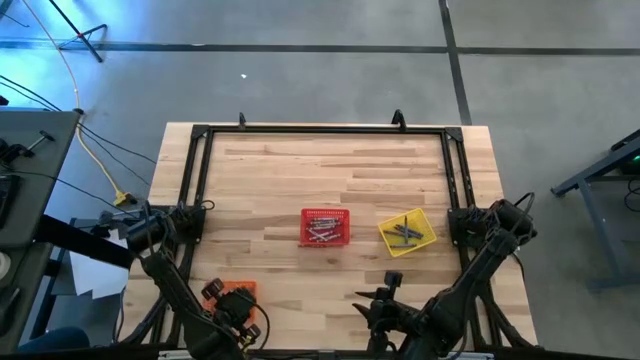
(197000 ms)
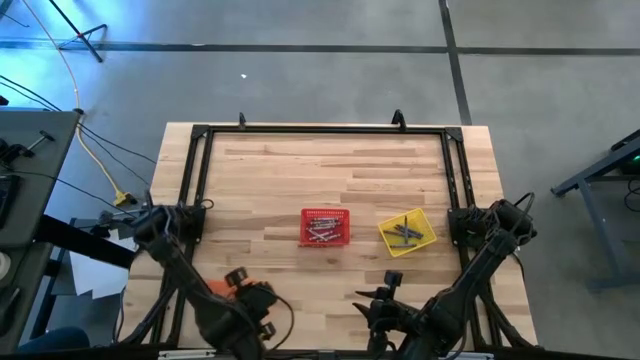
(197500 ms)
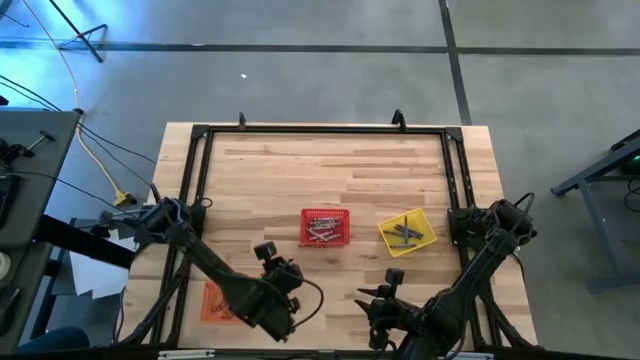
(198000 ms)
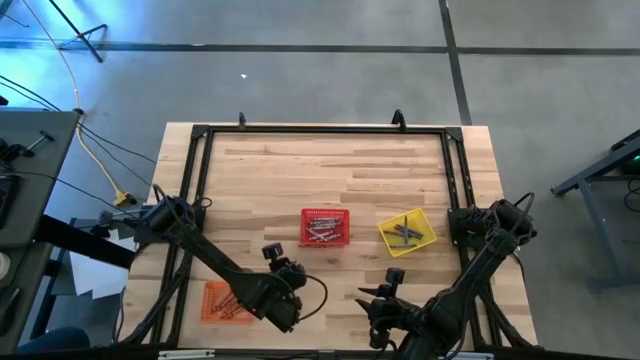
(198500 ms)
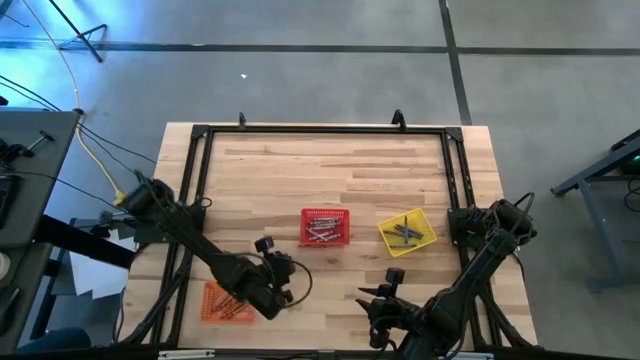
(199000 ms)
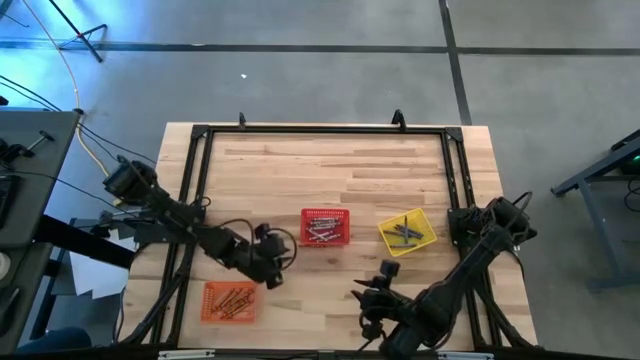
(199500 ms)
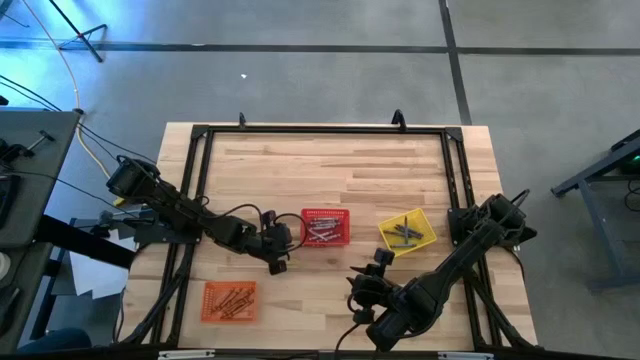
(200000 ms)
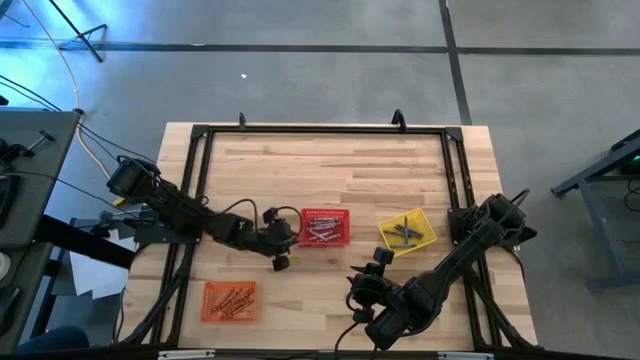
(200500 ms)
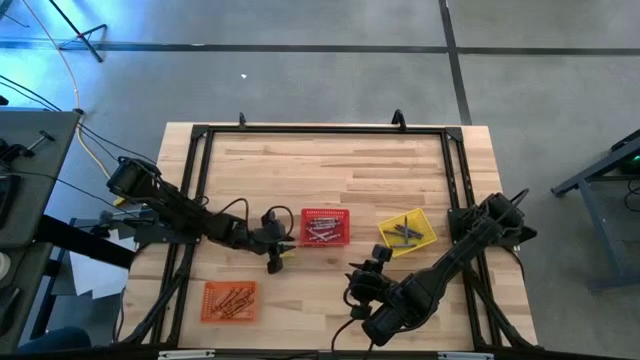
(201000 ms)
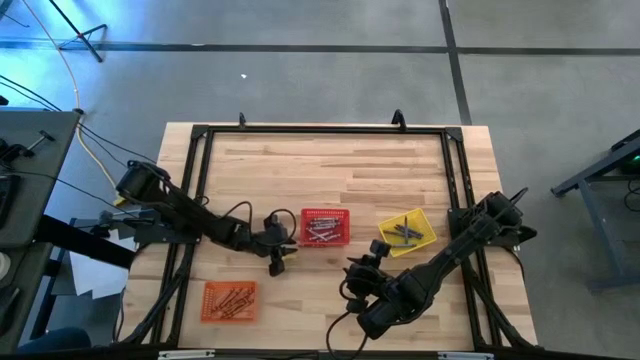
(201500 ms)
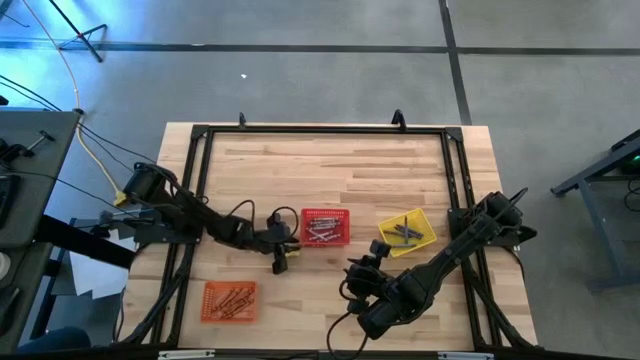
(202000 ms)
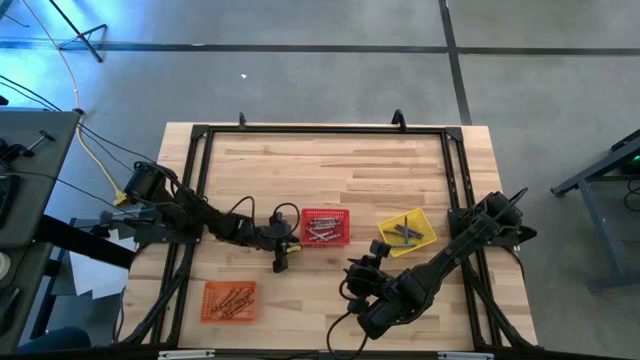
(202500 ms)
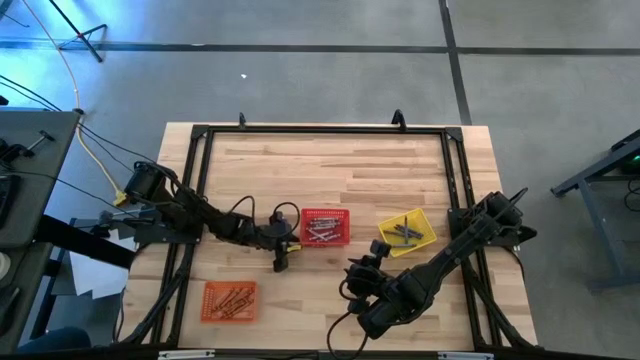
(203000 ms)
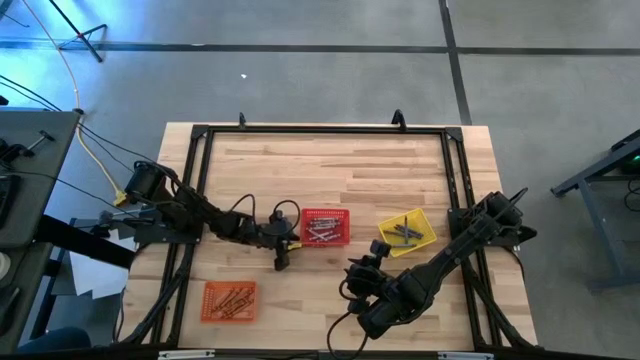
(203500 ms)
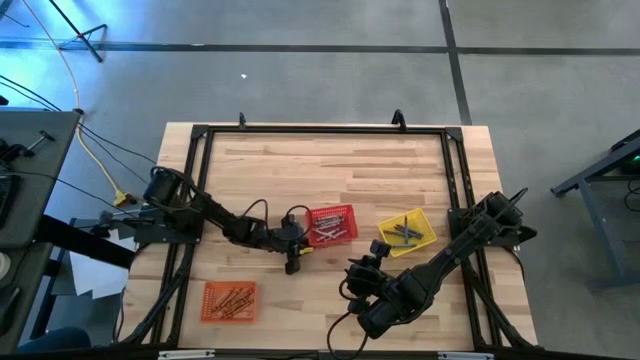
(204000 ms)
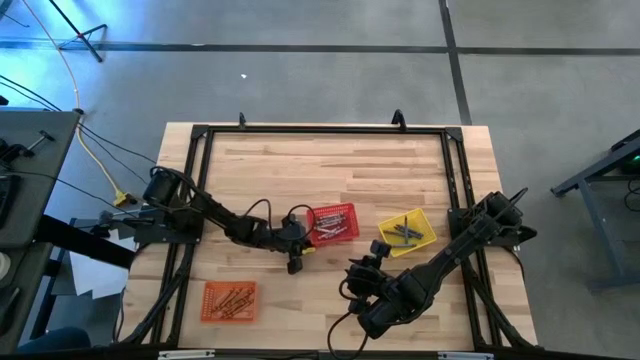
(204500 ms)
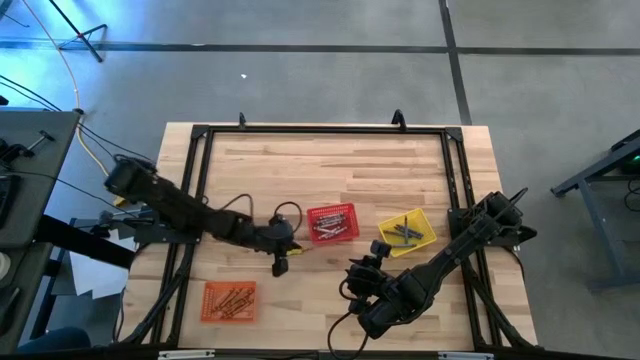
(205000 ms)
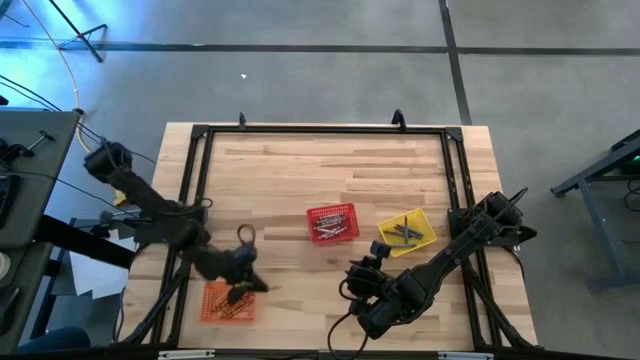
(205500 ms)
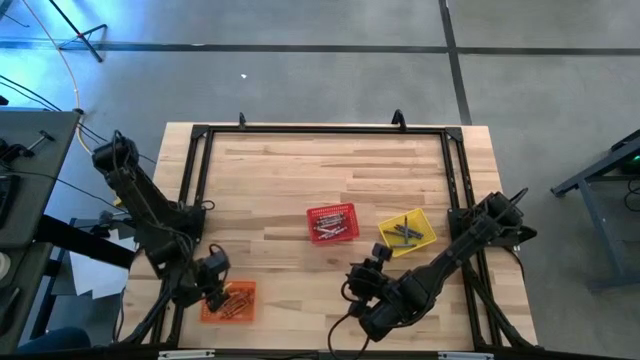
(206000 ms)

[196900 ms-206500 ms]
Task: Sort crayons
Put the orange crayon into the orange bin

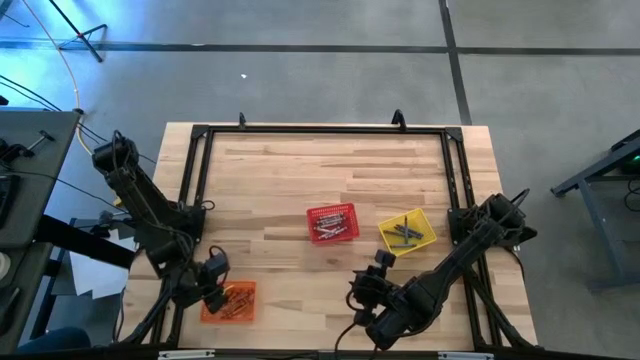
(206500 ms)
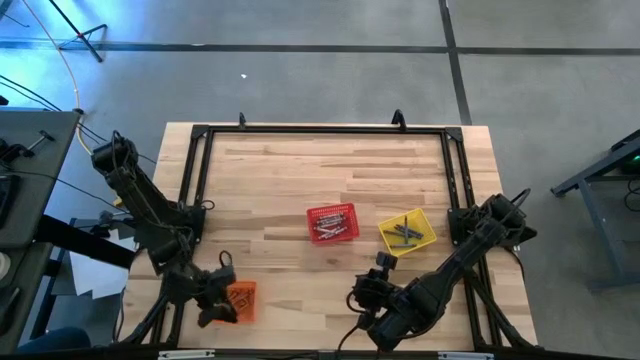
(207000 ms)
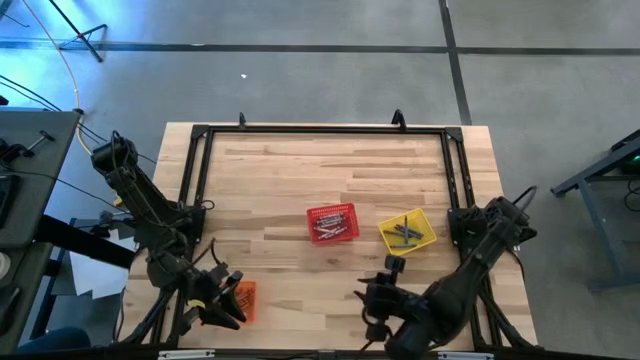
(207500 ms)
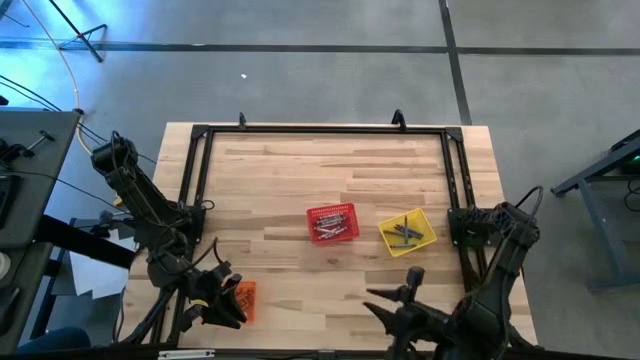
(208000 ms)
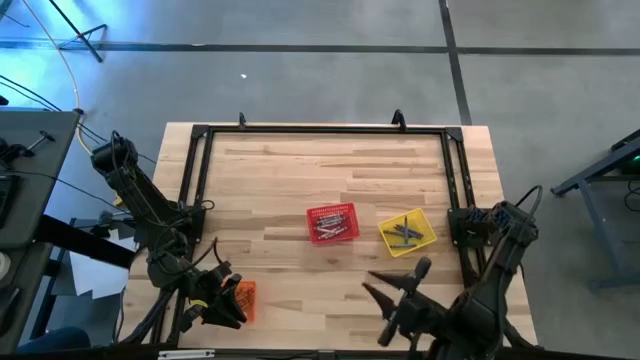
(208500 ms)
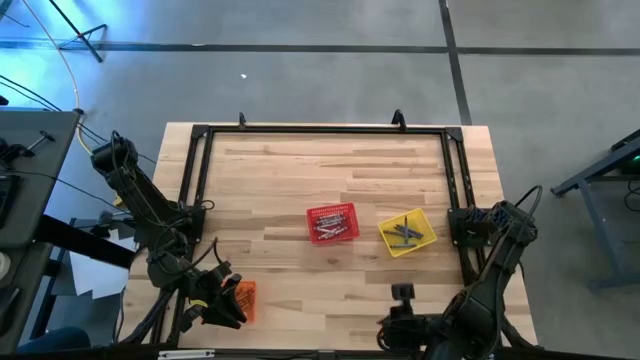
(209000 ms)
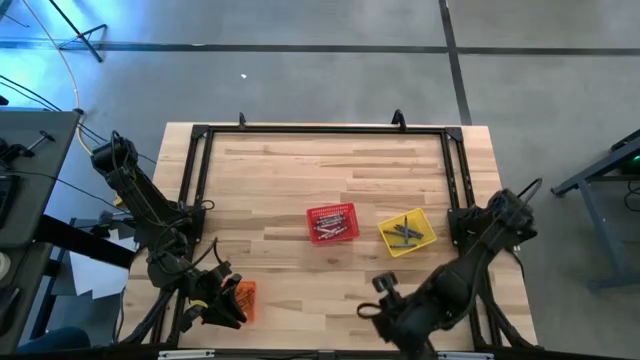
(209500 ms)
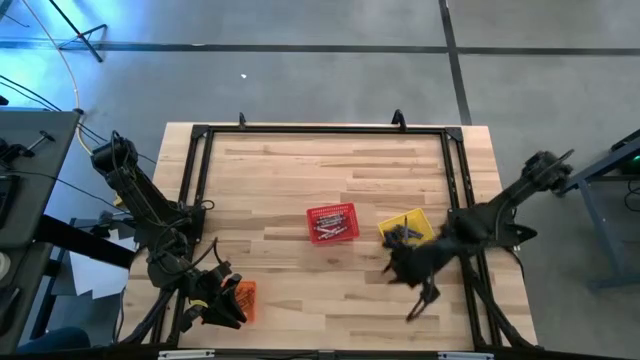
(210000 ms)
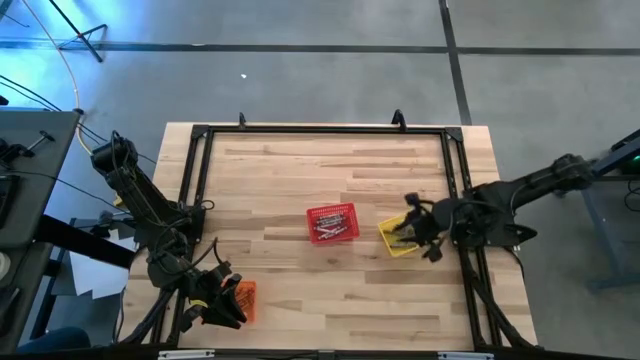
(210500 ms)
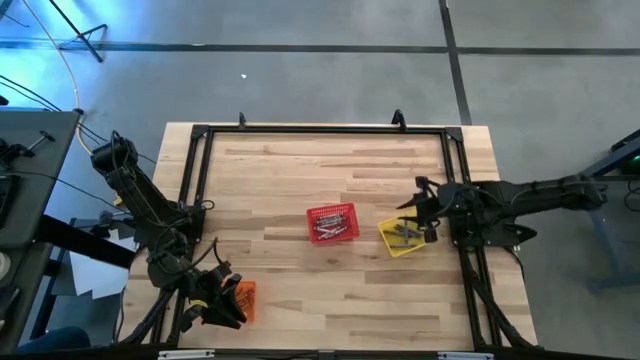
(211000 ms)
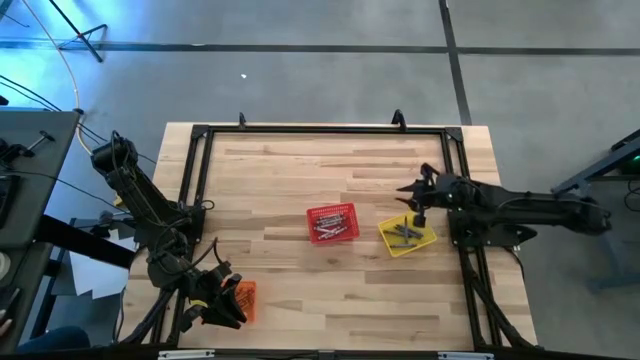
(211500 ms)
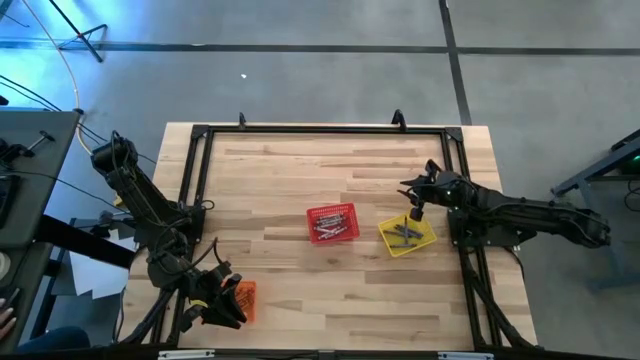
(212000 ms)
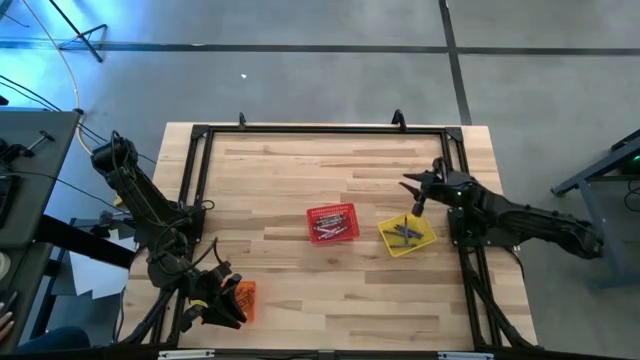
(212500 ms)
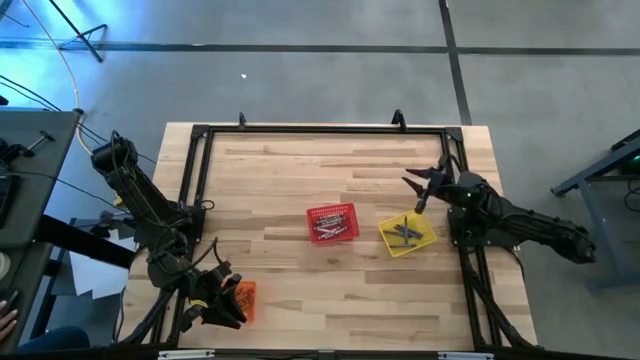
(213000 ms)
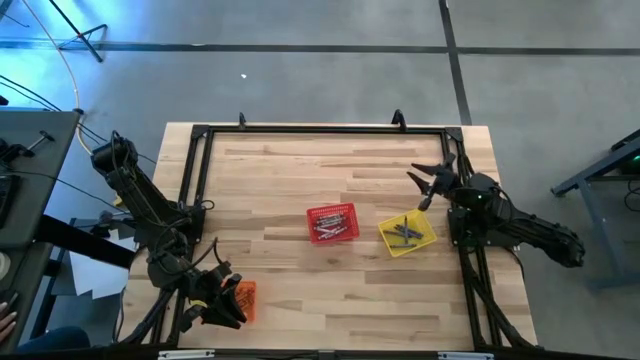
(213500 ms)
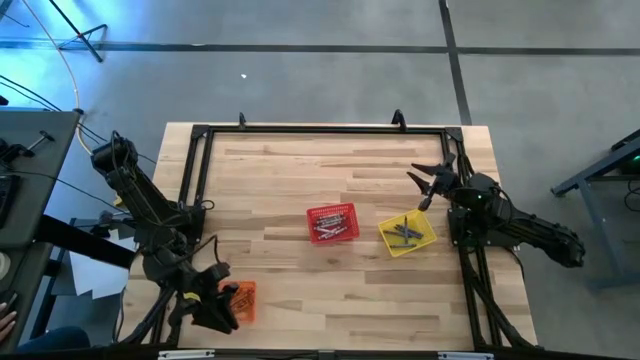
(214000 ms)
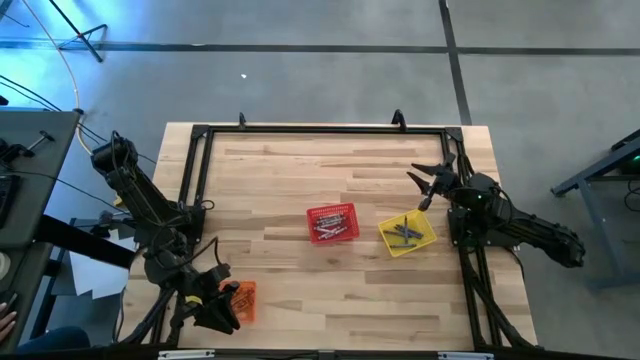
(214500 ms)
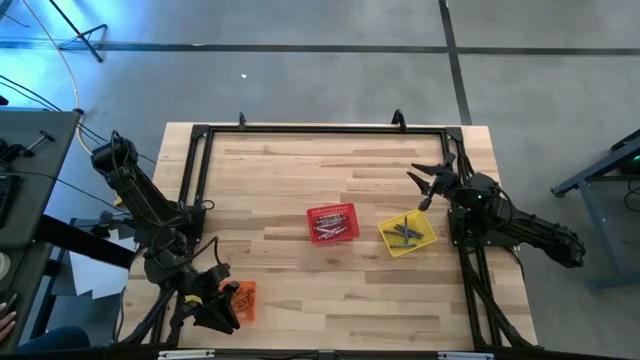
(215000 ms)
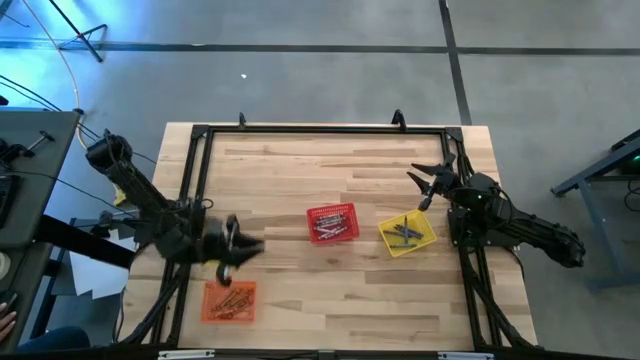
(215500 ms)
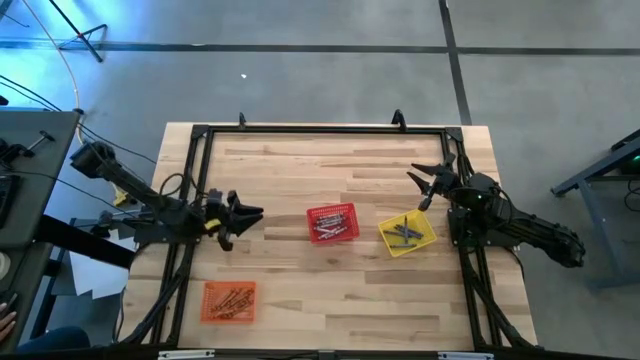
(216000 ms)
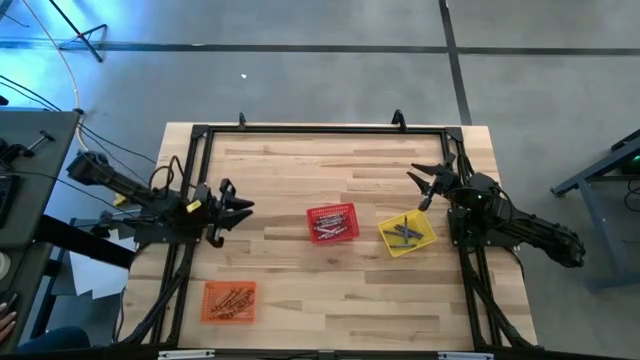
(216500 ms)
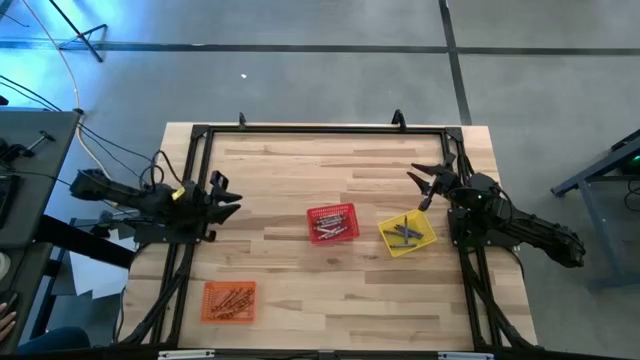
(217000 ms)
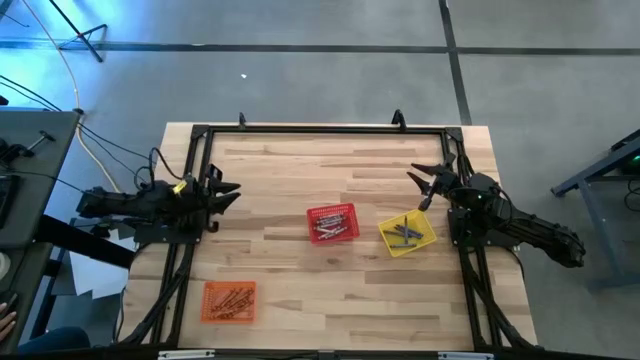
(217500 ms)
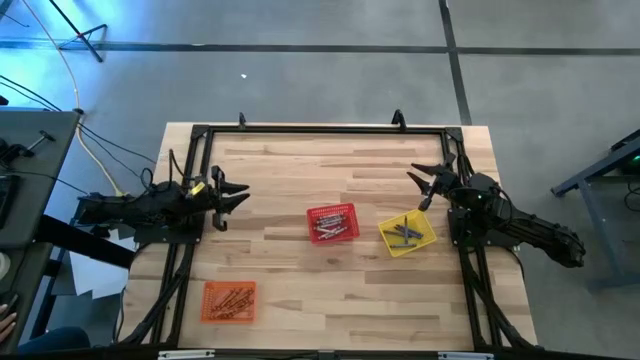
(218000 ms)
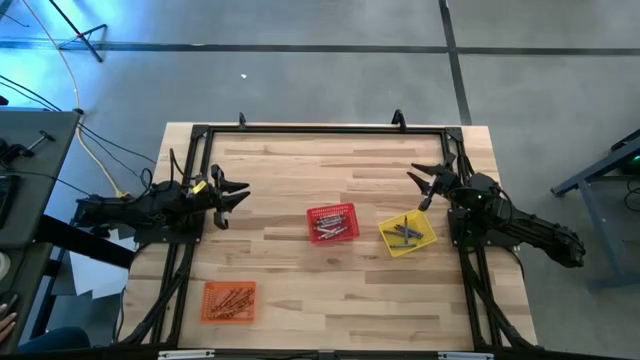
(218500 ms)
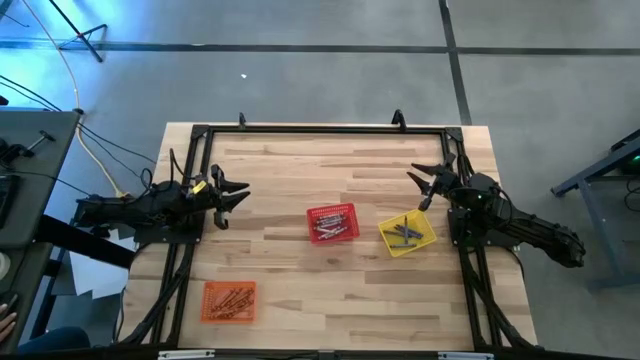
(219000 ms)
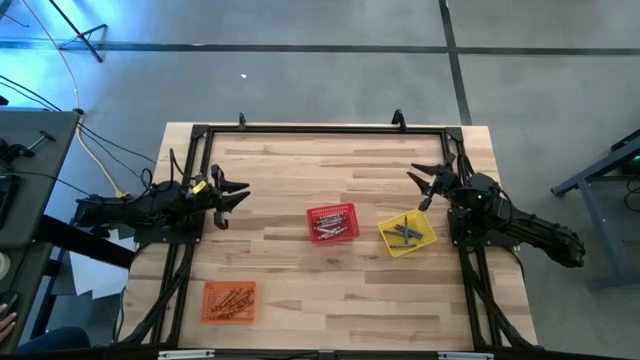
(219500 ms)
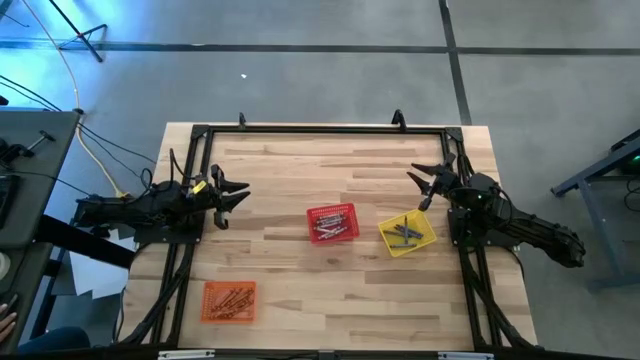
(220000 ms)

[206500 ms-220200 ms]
Return to Home Position
